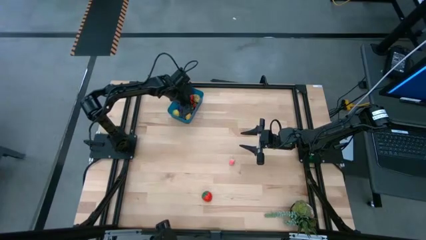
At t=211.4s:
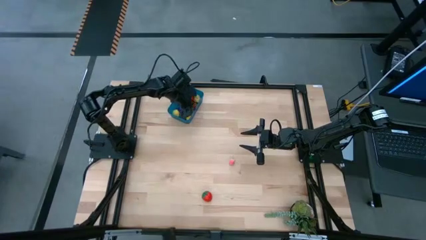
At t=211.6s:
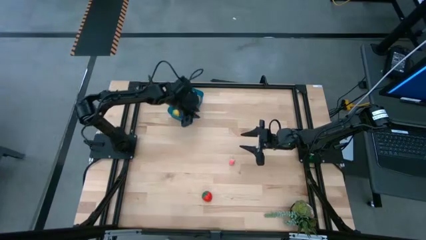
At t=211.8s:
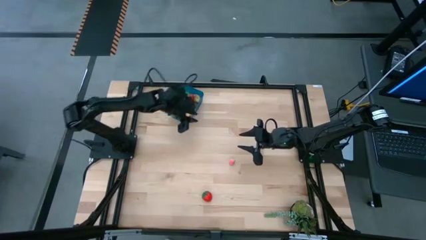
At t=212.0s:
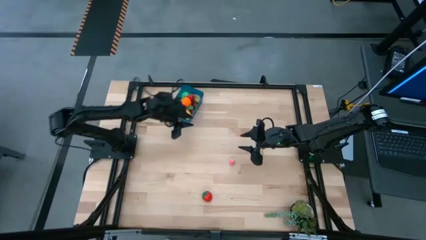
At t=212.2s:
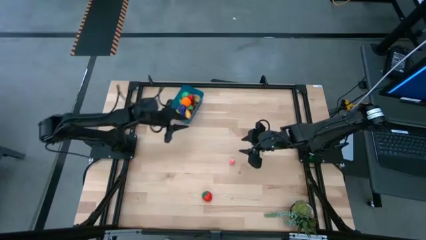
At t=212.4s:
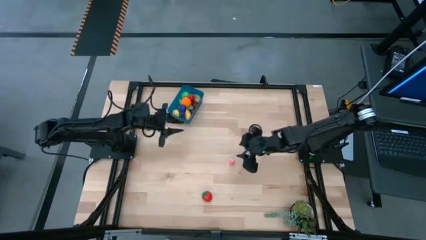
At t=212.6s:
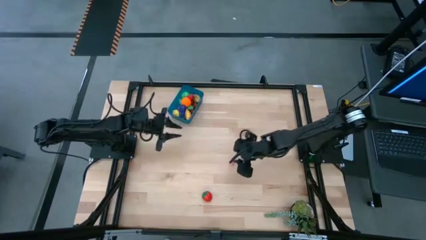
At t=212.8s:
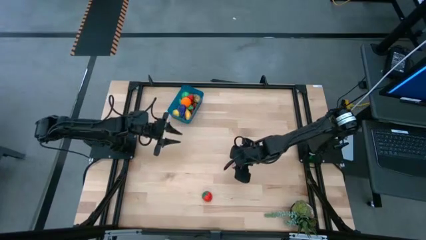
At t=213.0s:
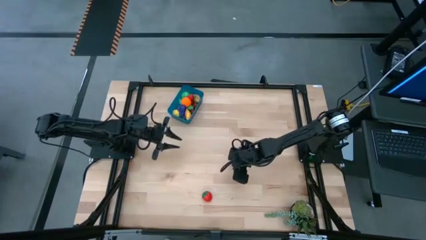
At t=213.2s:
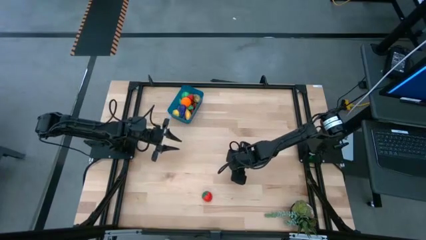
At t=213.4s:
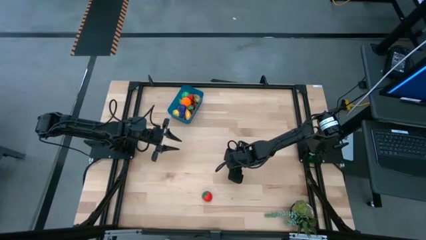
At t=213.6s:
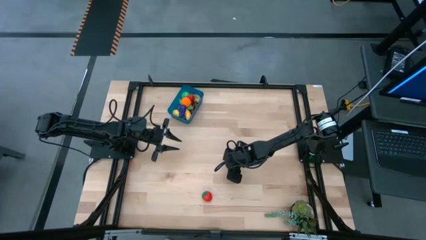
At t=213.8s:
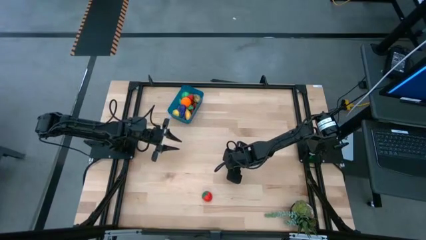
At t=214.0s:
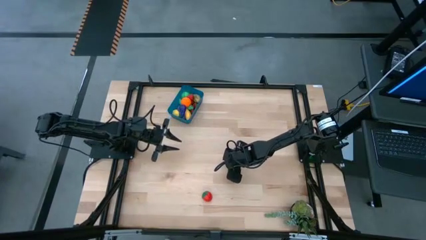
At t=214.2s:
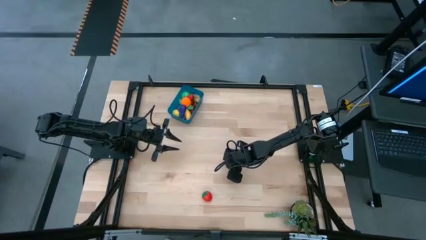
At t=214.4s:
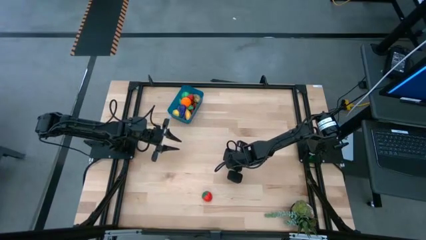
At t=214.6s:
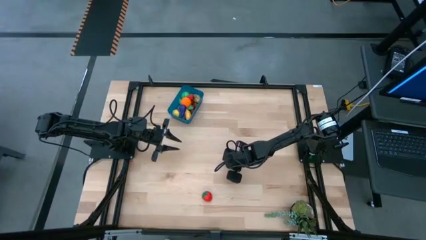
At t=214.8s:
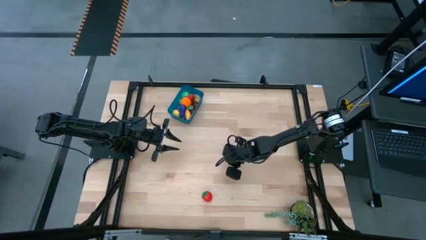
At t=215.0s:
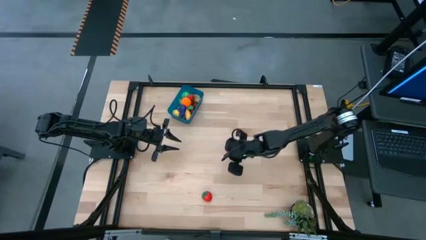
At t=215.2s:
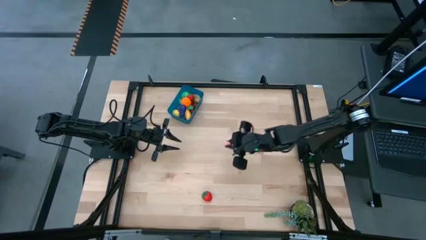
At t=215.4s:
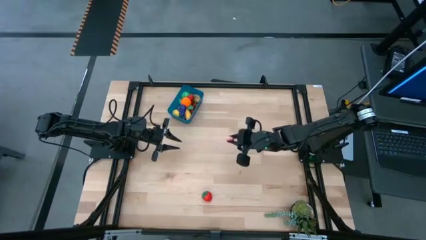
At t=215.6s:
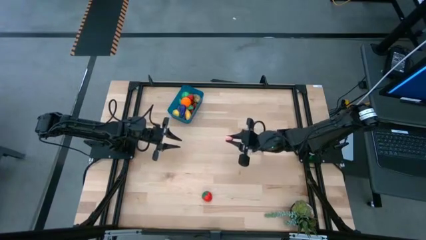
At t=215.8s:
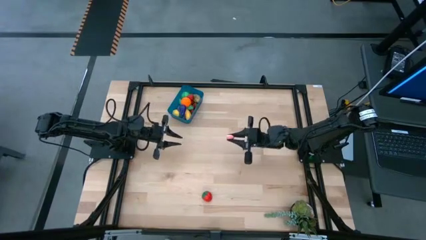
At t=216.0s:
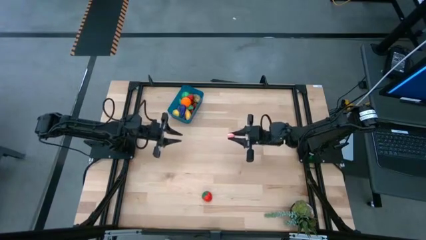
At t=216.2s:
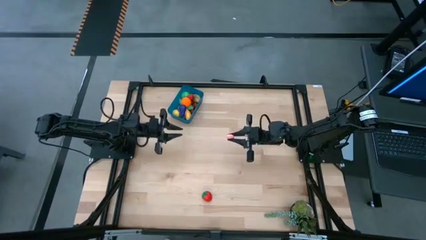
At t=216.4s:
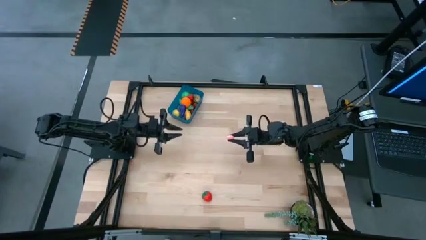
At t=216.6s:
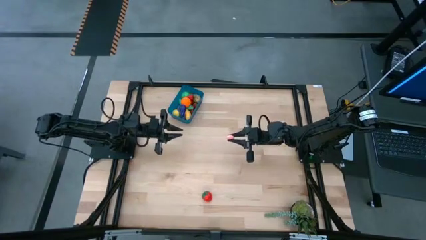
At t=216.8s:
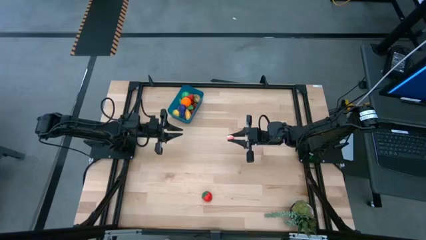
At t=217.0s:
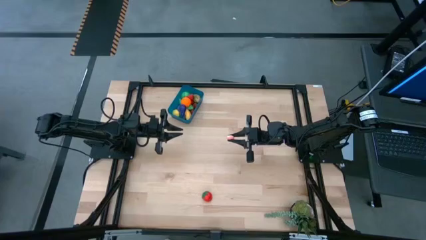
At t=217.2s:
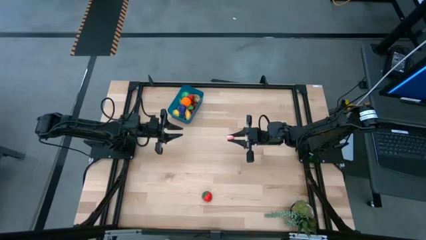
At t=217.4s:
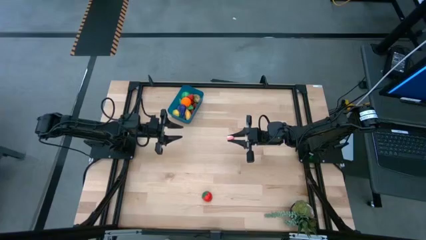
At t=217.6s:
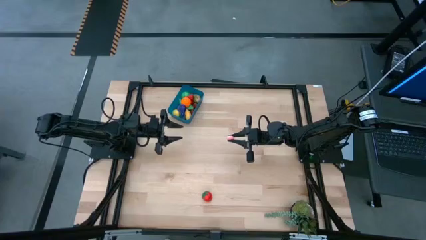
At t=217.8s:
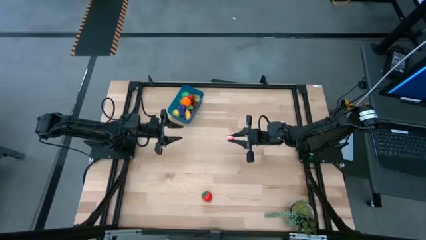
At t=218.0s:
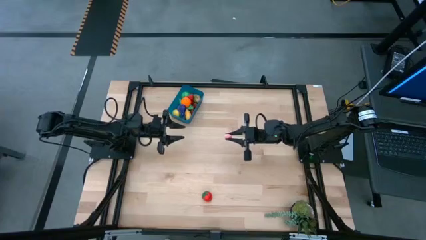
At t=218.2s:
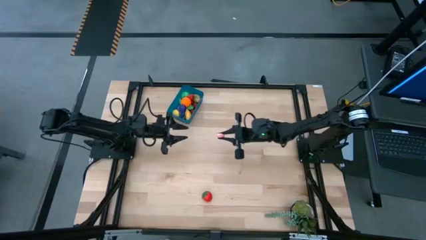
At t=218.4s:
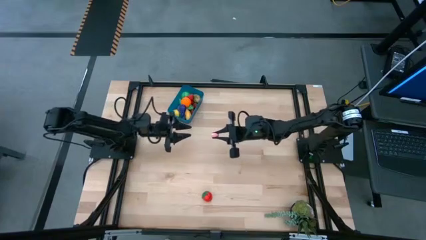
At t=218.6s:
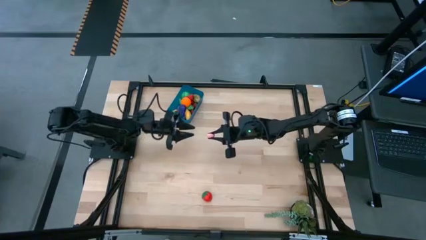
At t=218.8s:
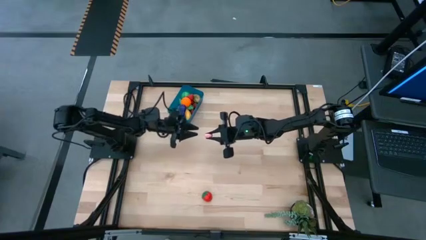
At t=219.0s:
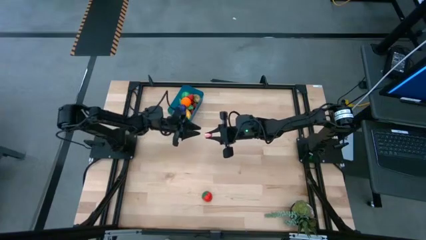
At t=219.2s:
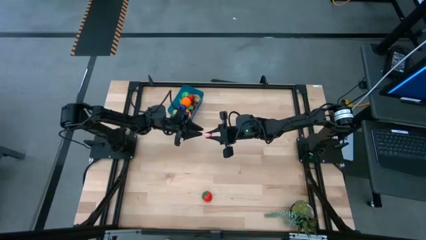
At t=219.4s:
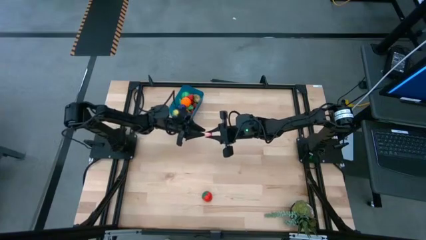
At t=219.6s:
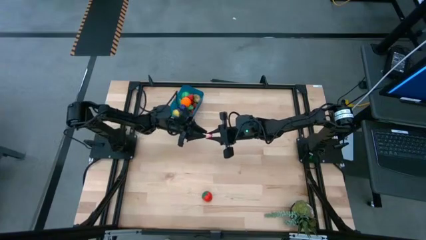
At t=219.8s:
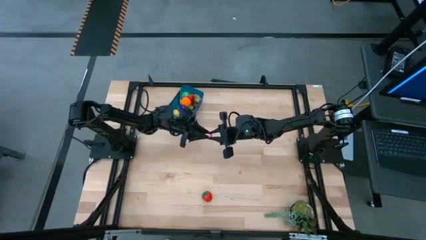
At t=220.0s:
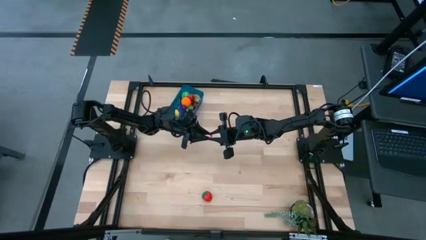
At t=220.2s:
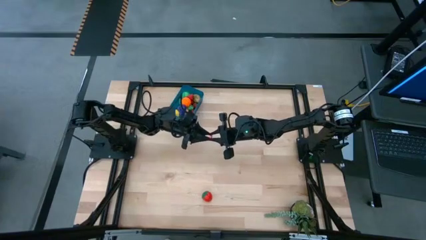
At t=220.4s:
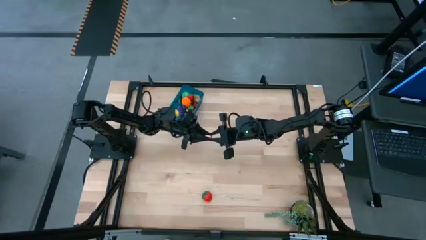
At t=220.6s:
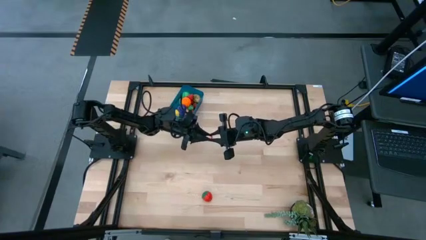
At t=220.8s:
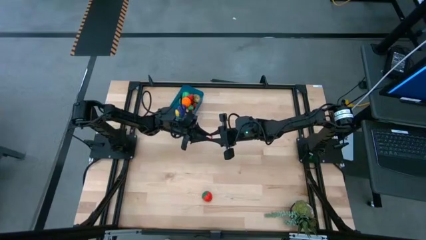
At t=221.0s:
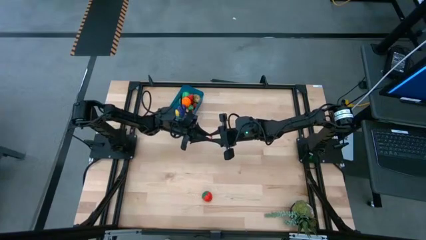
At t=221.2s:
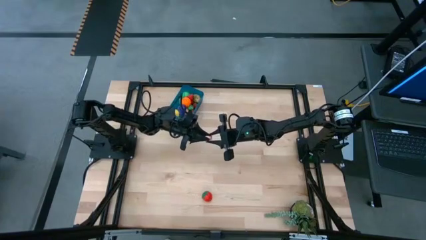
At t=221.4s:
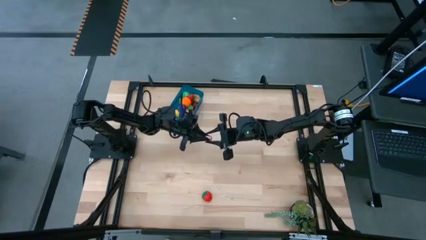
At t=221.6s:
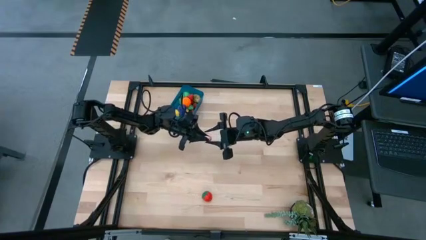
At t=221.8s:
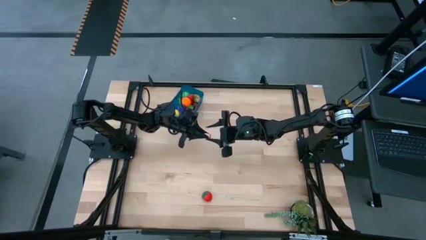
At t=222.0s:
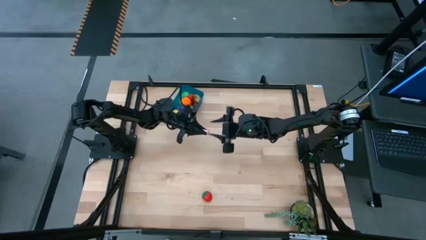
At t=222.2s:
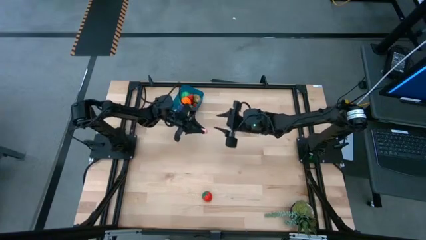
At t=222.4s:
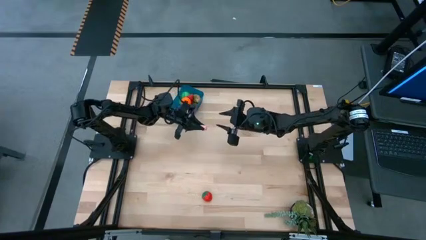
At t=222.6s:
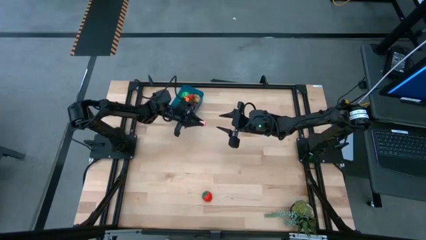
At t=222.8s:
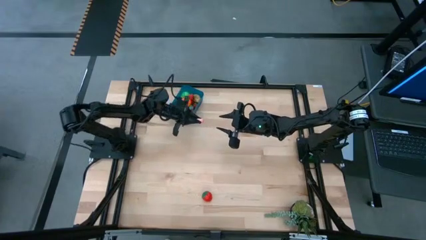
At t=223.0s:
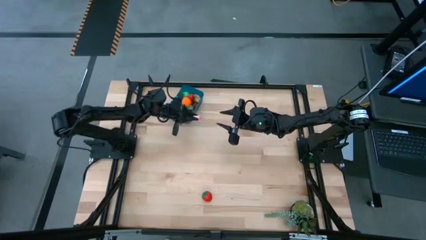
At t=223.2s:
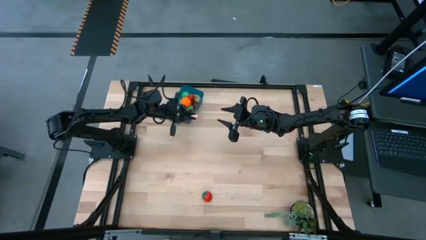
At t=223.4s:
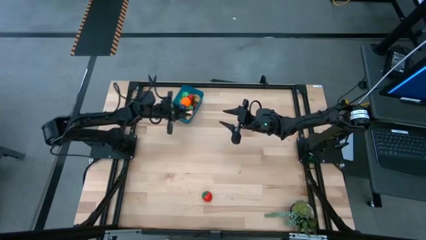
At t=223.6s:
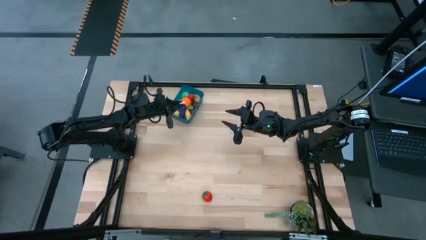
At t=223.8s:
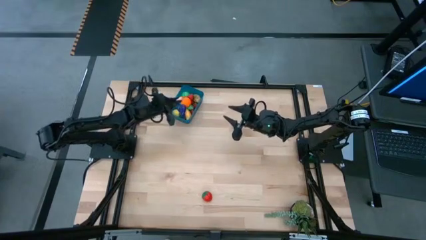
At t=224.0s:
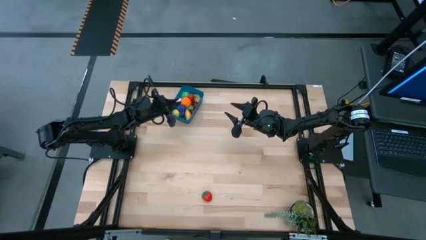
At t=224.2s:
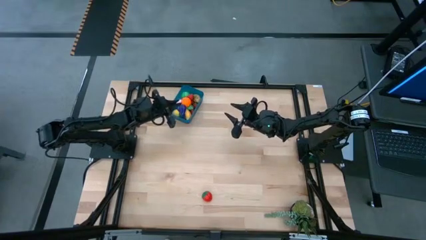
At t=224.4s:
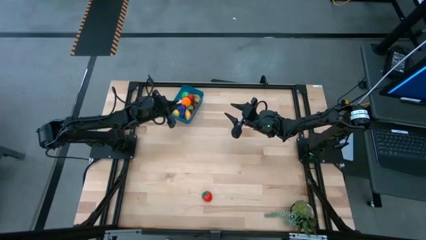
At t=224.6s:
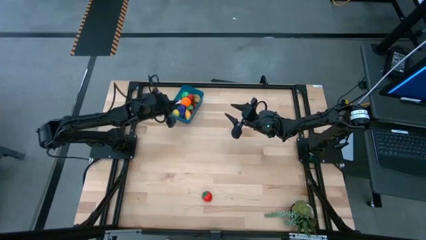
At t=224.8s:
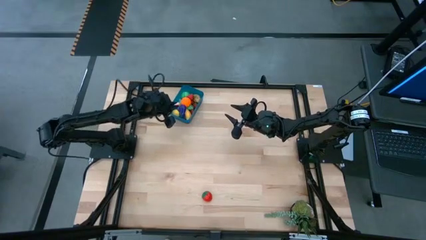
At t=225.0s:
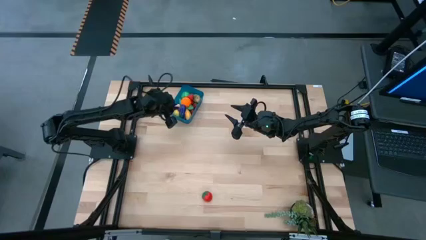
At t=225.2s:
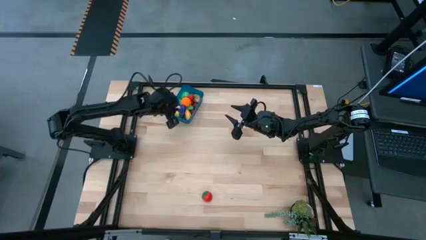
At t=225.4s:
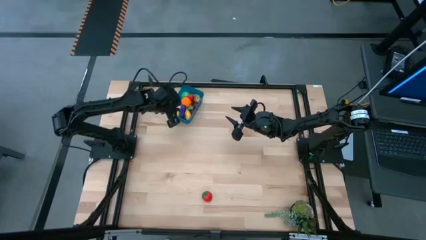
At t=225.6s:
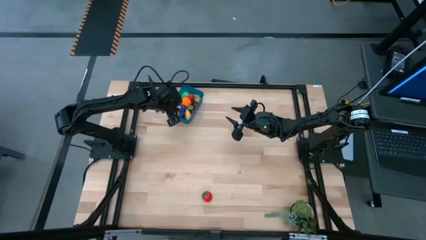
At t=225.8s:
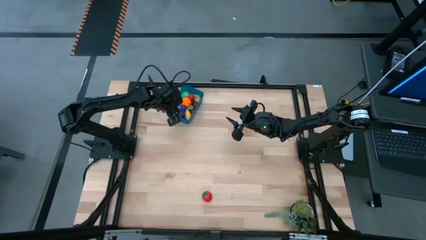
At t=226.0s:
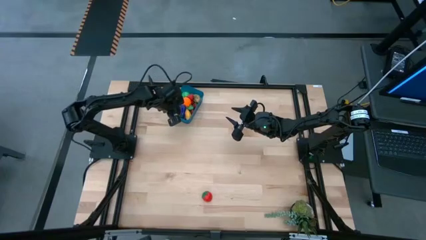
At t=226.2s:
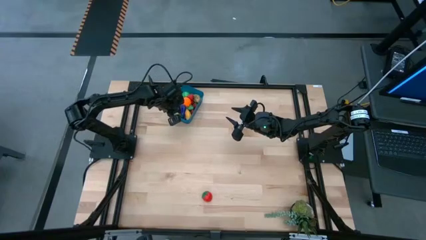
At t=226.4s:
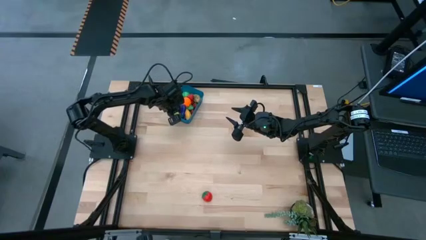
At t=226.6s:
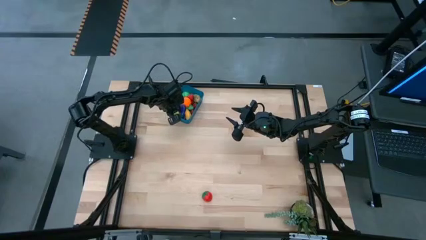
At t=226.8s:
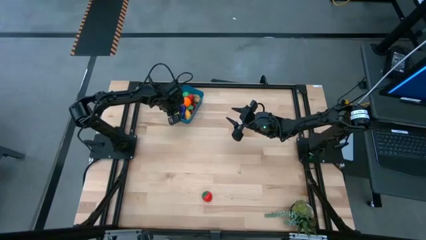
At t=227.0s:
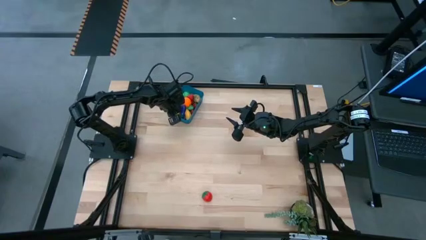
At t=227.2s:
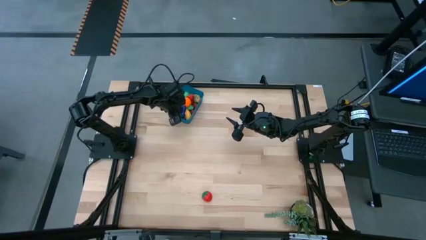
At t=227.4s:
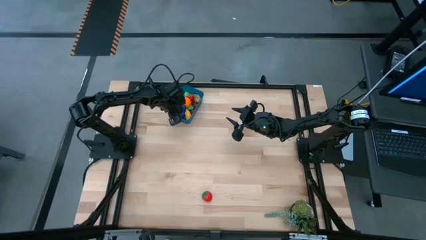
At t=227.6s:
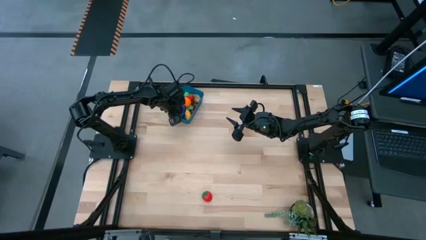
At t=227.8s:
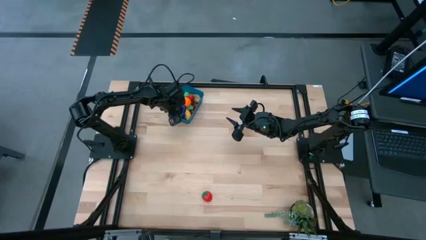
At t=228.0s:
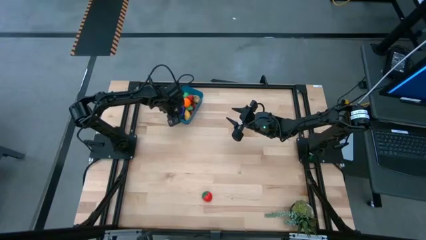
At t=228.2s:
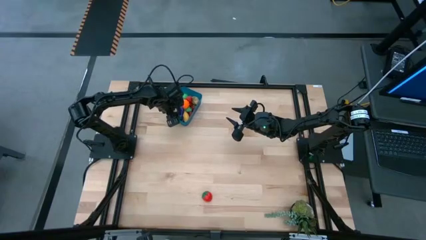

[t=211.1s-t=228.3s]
Task: Pick and placing Produce into tupperware
Put the pink peach into the blue bin
